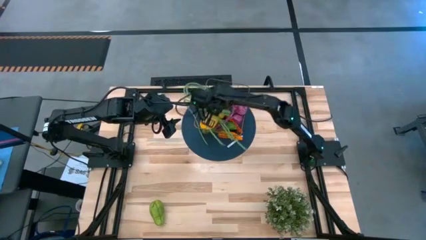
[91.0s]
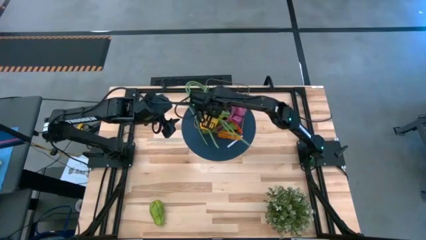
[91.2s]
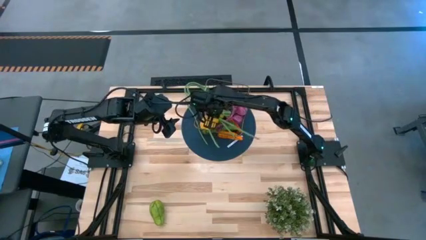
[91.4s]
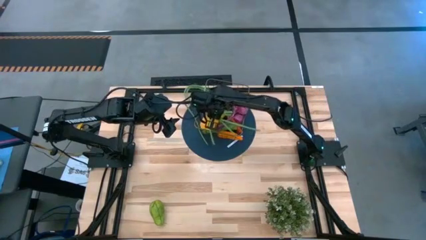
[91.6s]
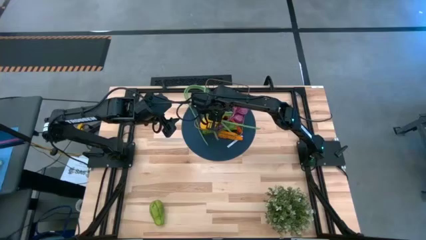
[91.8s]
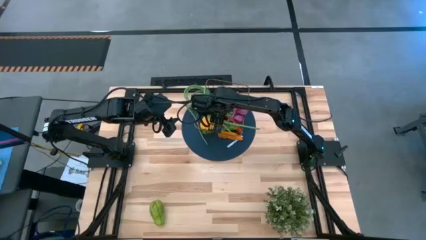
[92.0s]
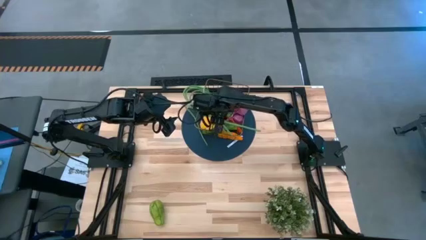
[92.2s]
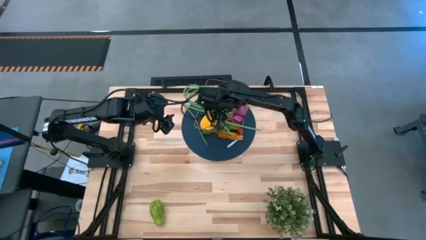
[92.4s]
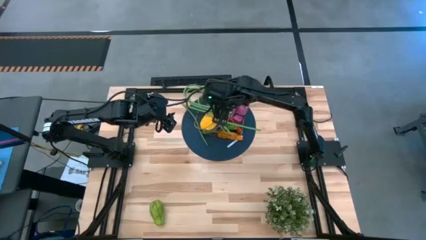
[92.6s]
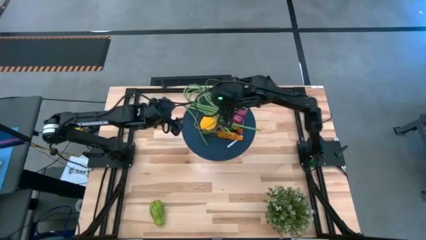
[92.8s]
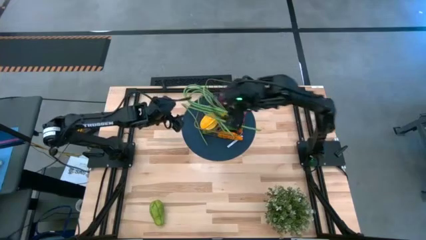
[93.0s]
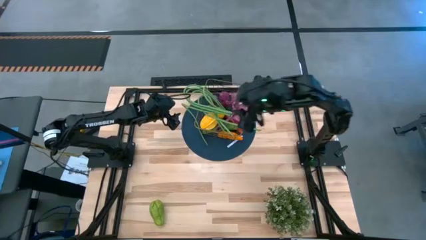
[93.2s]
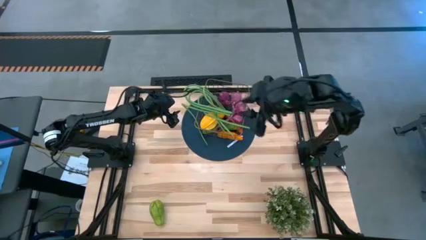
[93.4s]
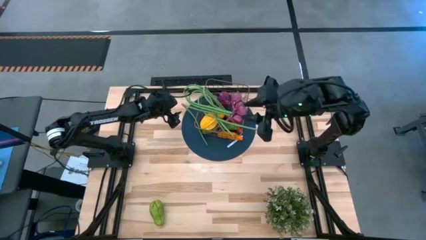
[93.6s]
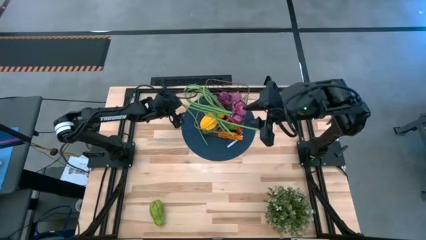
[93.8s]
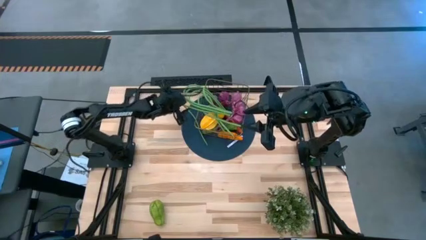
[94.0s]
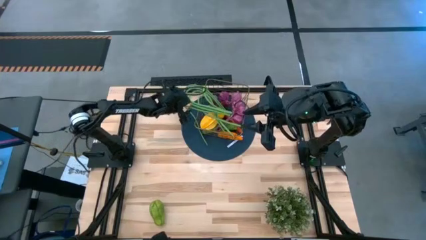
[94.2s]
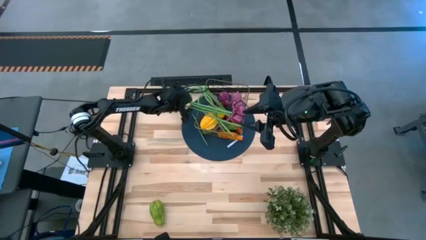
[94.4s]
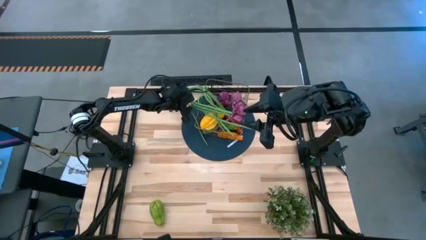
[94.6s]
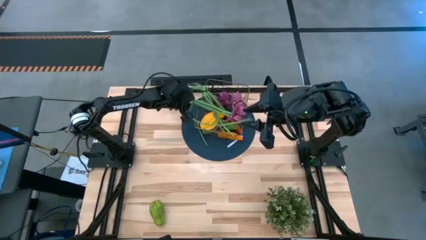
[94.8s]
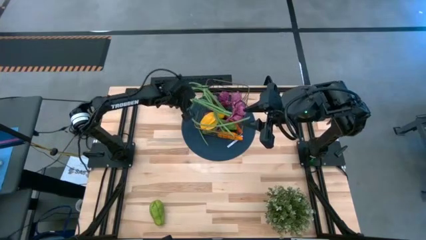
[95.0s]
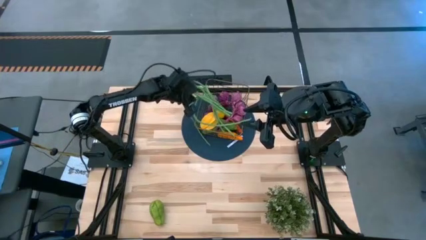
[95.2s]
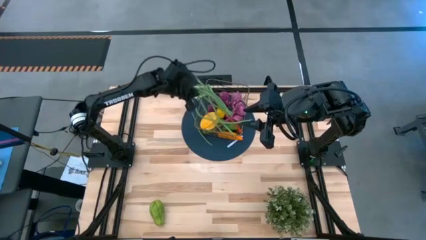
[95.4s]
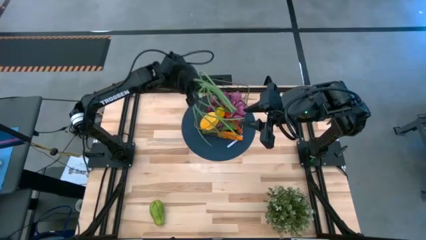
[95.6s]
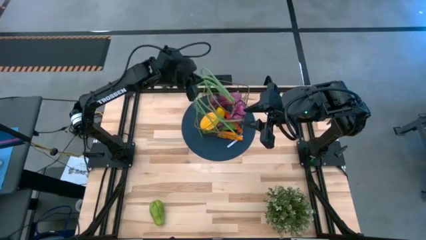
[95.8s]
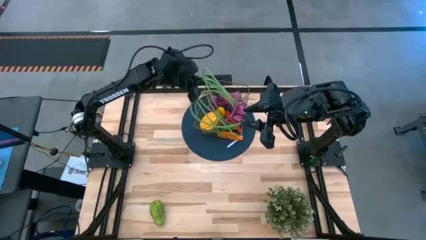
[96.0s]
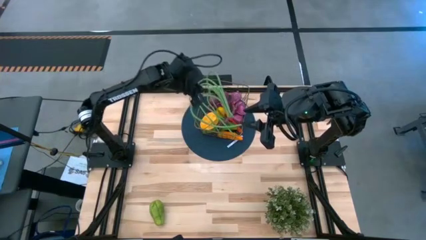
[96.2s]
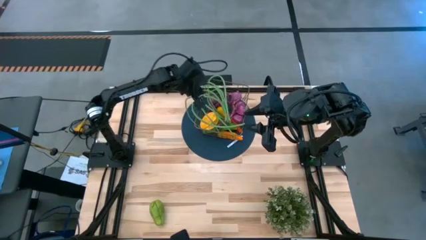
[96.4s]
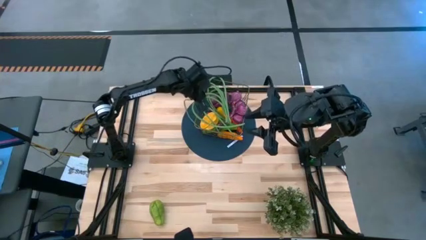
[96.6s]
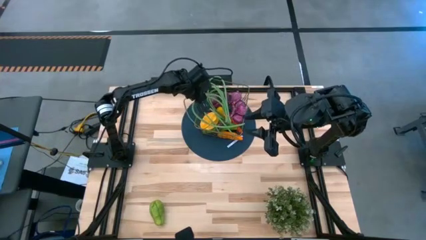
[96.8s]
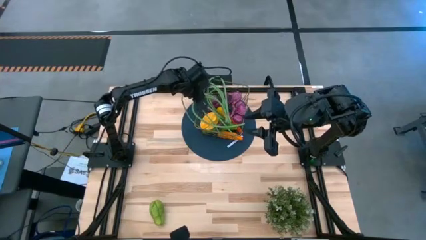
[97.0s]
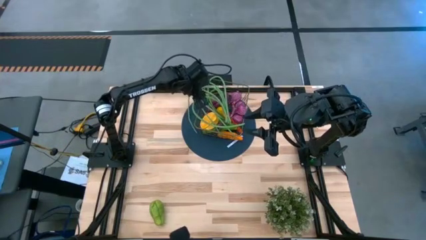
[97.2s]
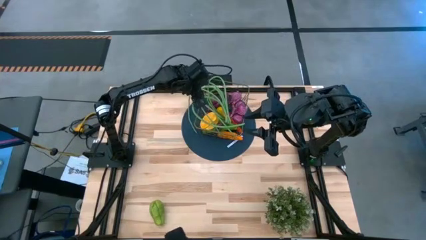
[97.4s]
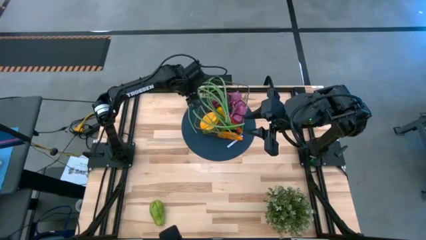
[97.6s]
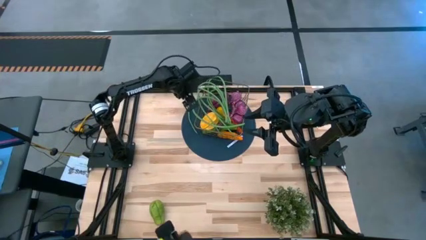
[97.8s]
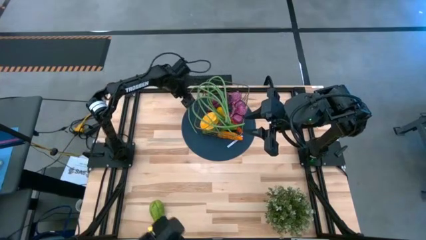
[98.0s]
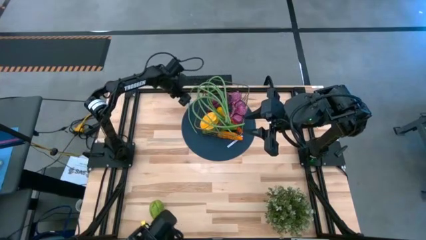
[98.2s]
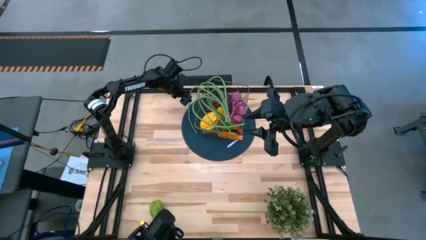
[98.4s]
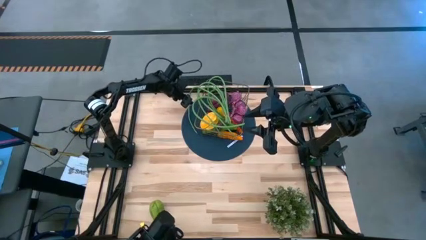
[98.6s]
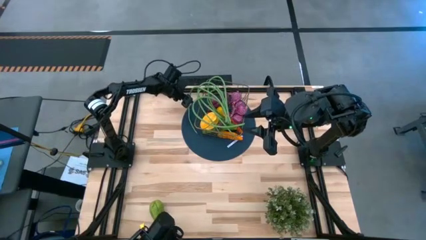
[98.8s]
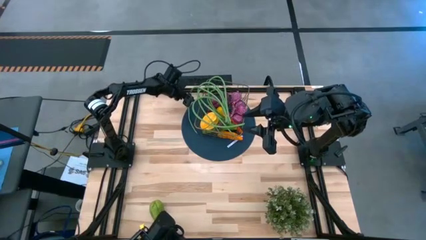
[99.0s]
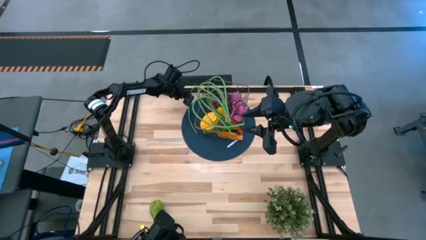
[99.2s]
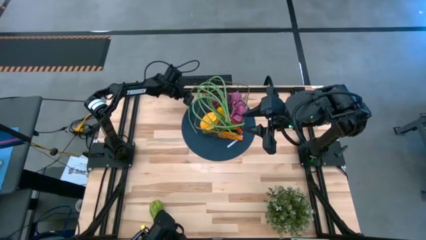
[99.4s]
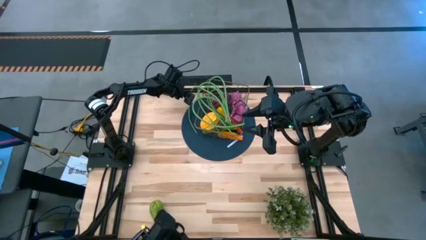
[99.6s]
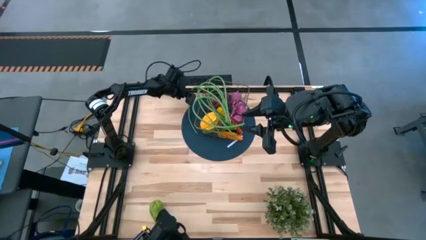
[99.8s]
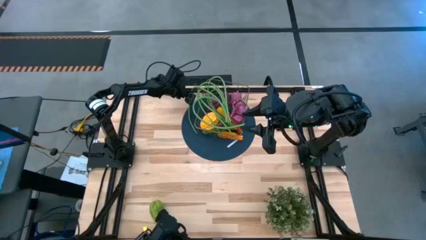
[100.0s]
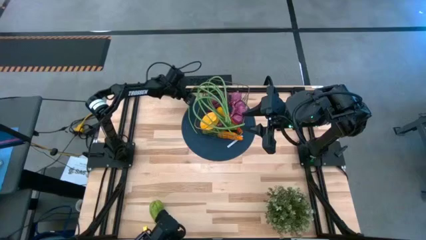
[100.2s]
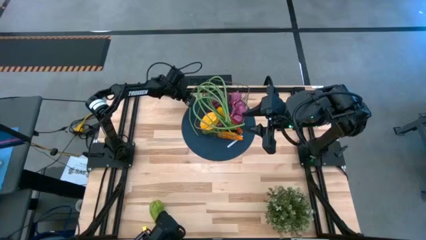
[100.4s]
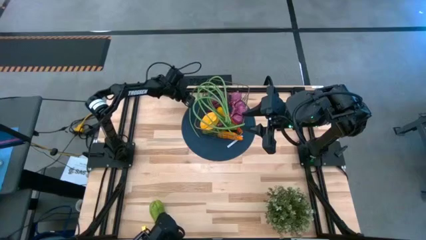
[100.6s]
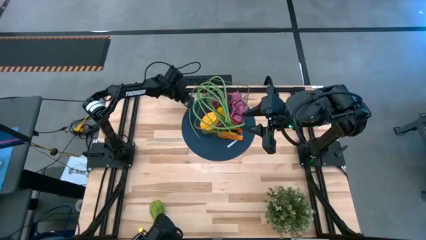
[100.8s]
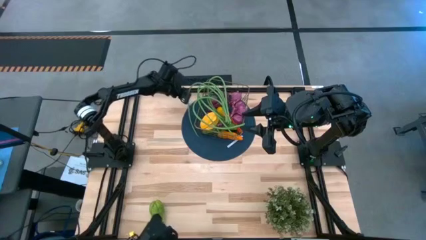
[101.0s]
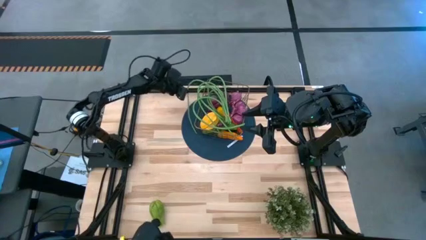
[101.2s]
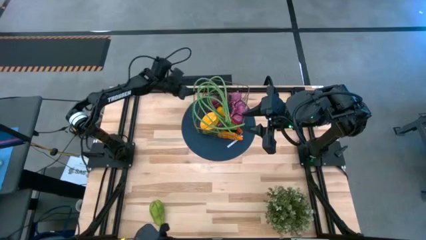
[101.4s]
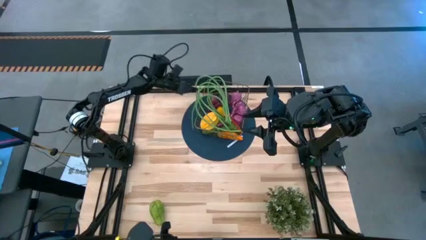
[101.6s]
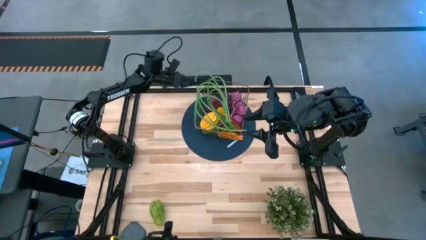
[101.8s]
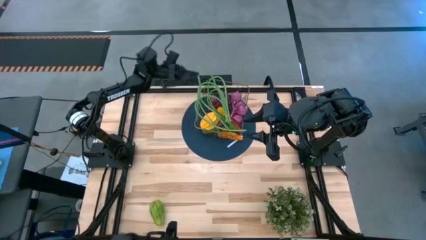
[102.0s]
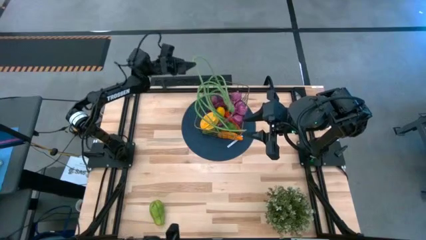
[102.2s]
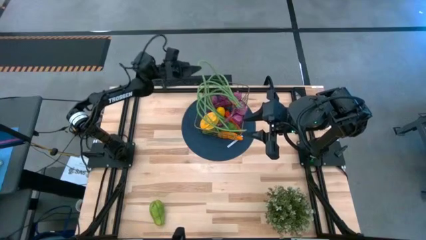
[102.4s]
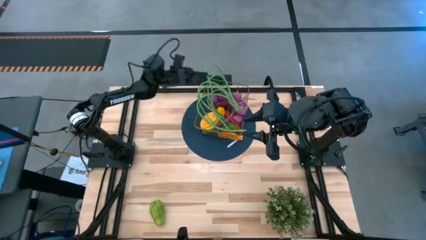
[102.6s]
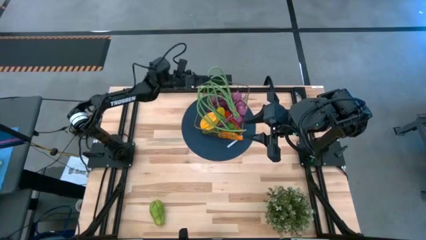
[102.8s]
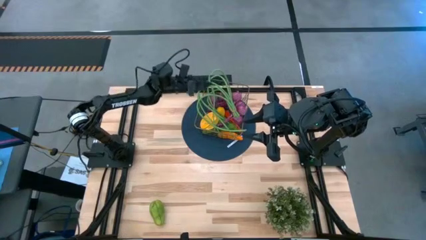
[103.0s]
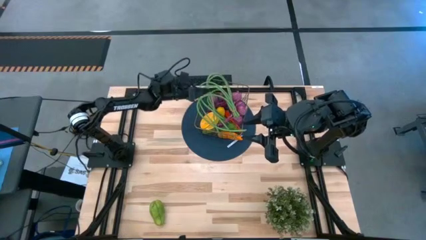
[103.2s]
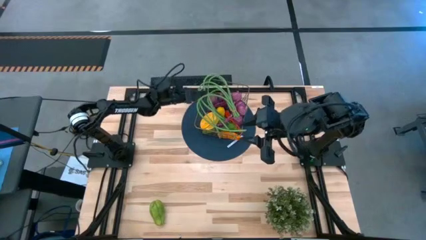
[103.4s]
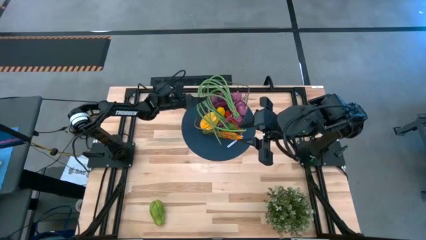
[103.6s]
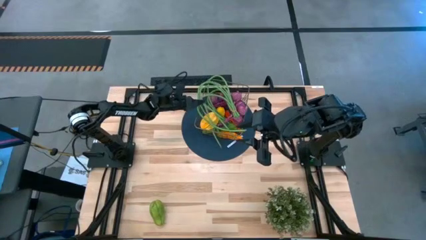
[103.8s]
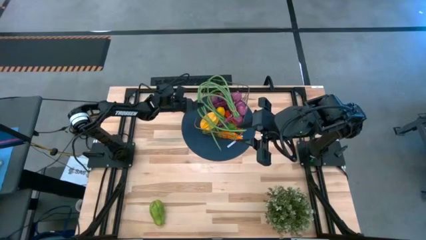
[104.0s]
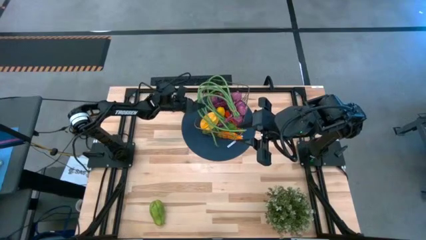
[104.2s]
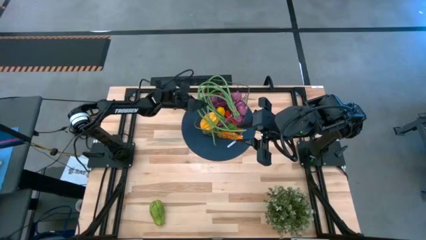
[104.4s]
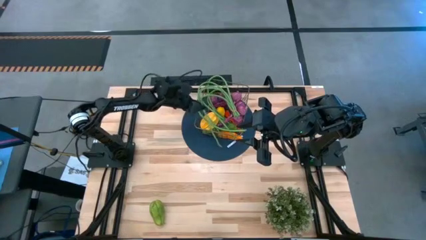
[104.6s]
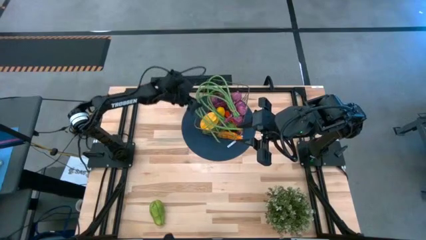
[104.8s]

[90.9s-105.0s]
Task: Build produce basket
Put the string beans into the wire basket
